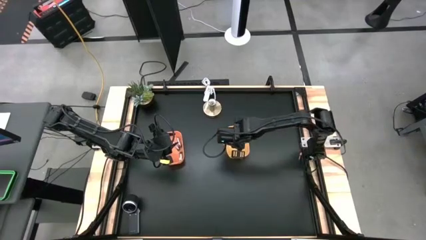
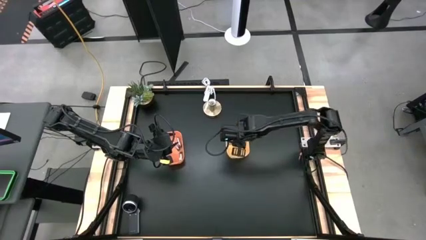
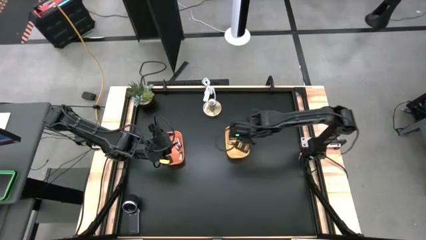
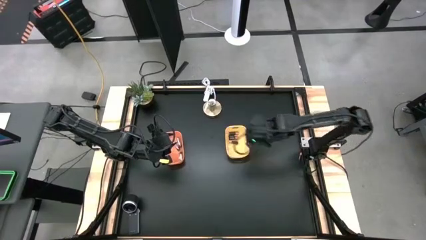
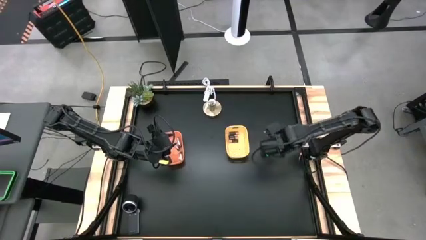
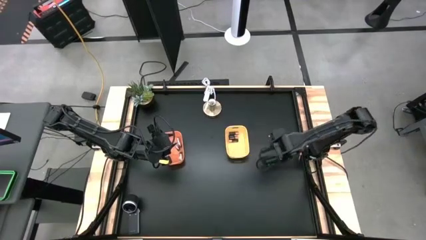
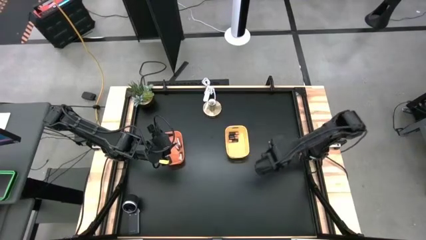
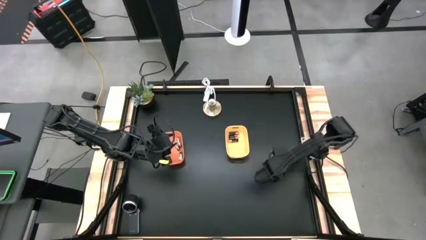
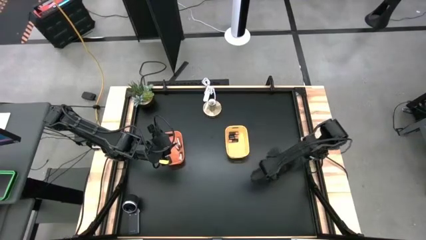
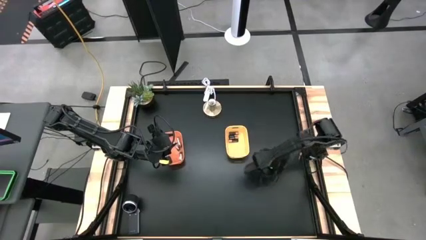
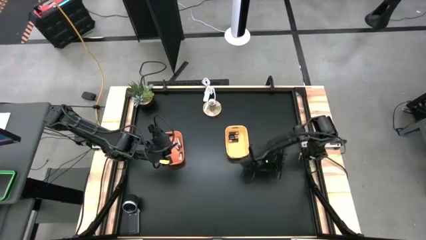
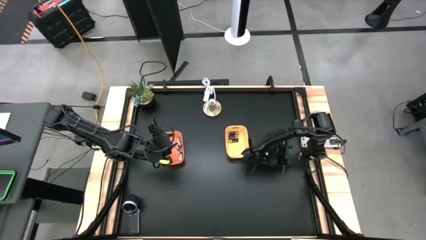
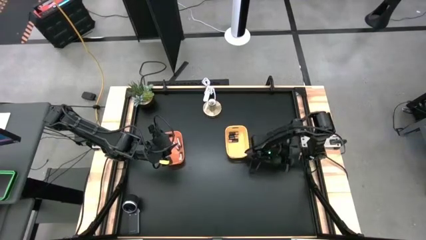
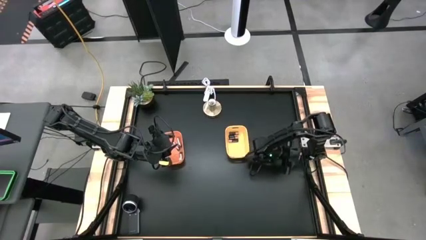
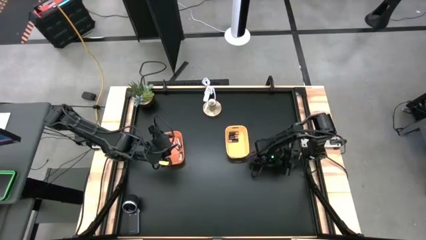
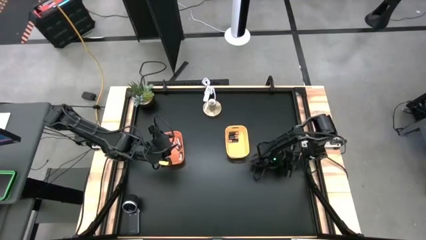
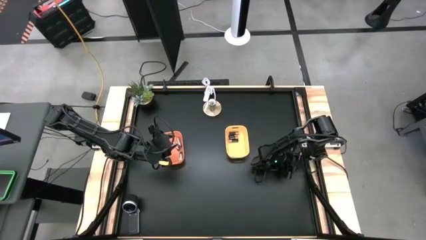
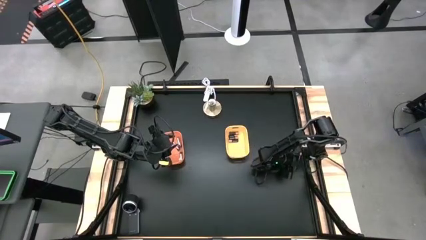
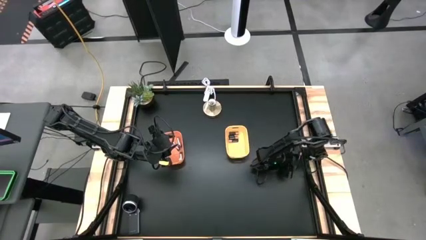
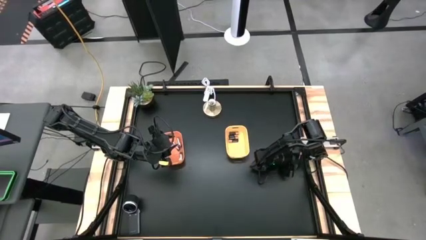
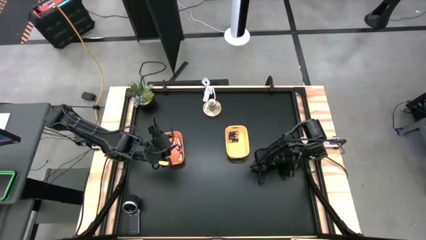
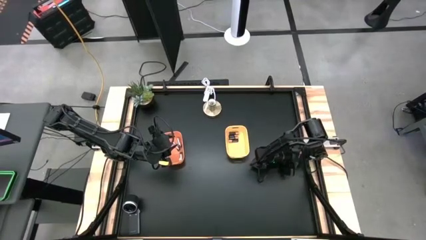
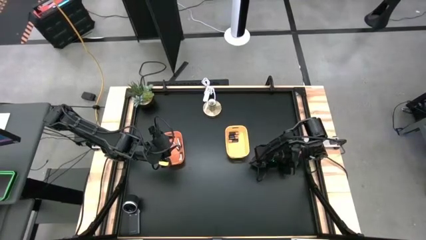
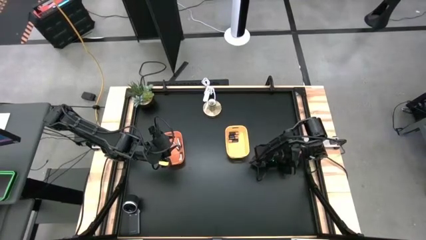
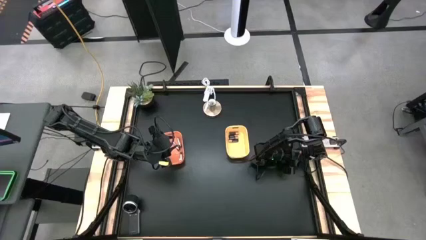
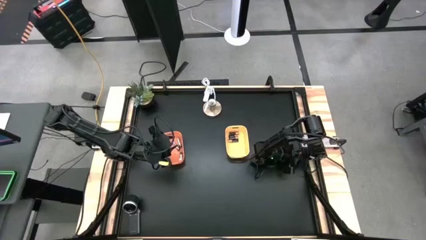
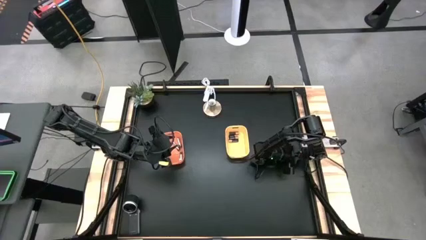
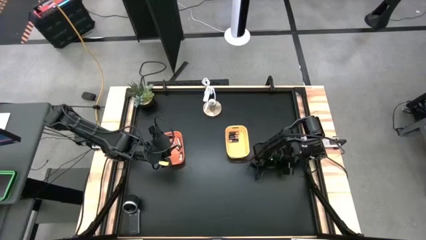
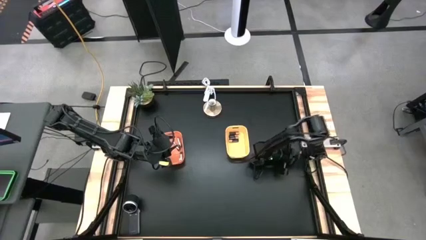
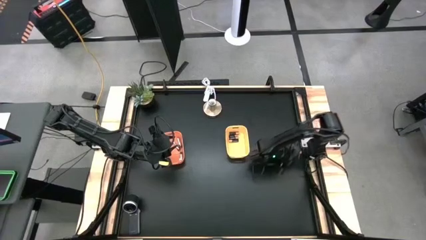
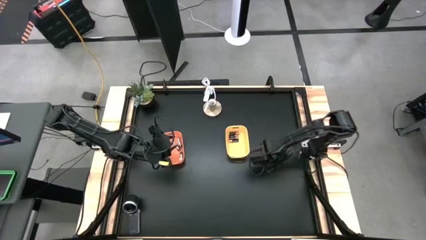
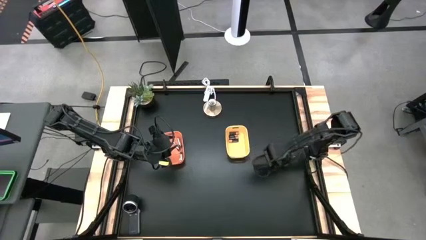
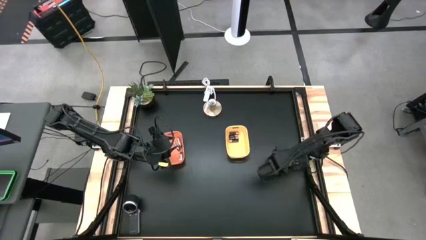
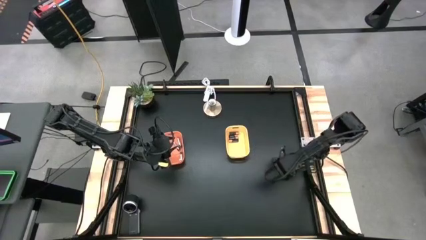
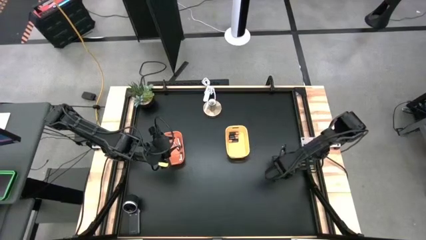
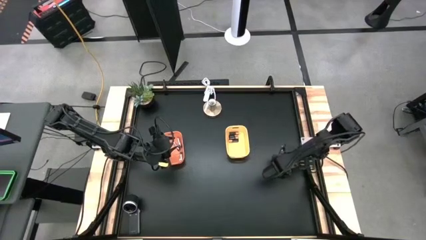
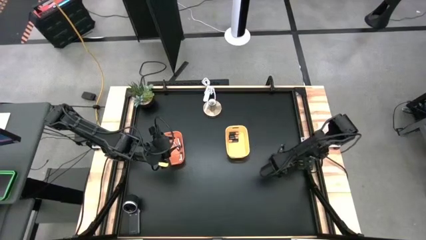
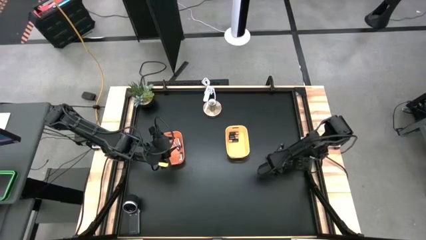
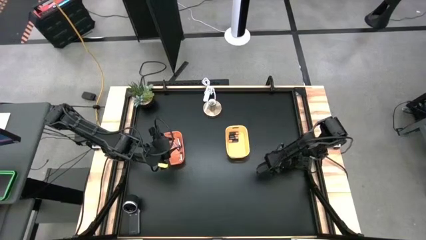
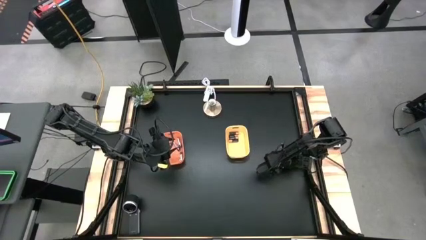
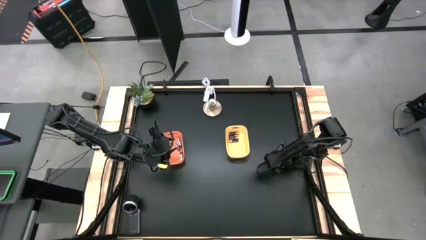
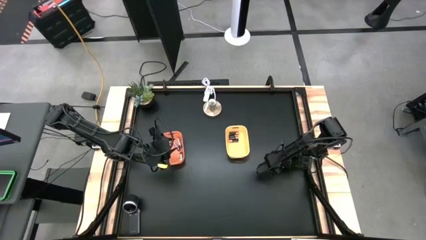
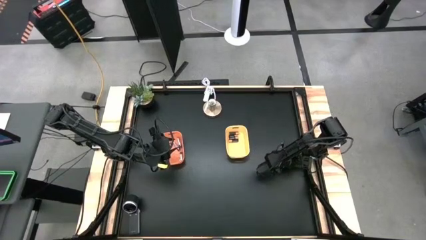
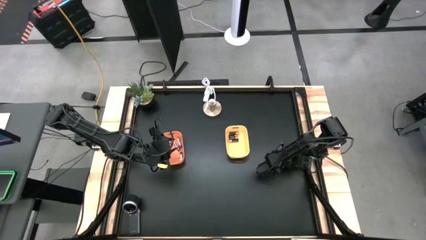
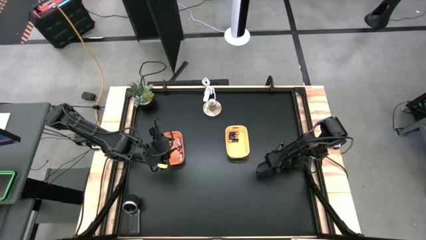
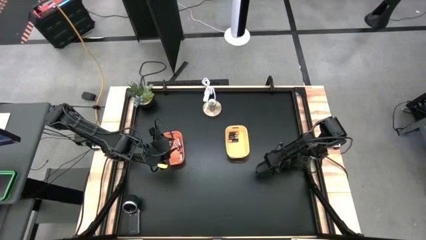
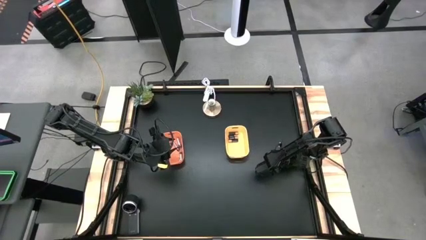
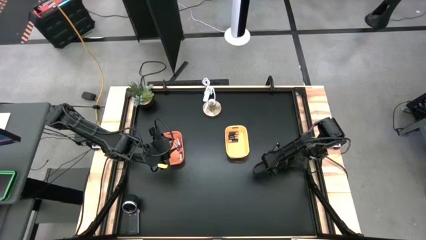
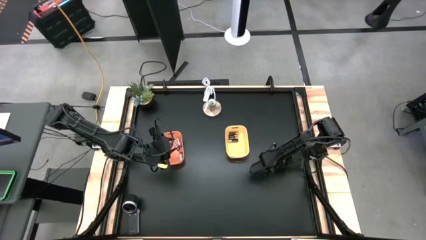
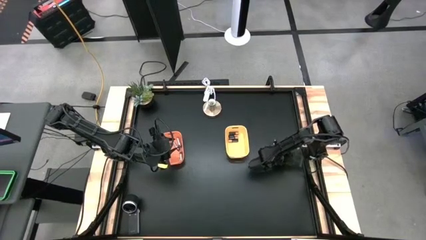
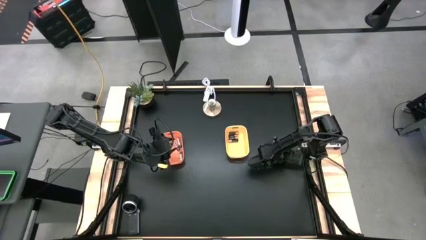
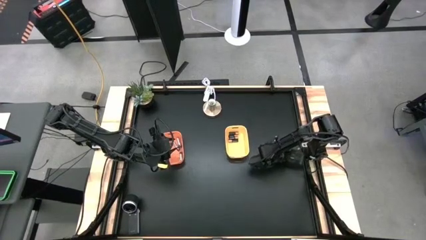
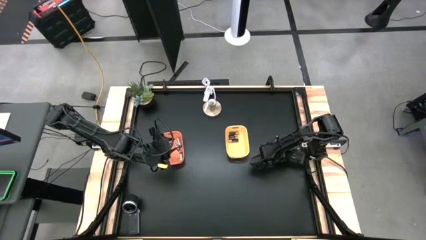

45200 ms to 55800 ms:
Task: Sort batteries
Put the black battery into the yellow bin

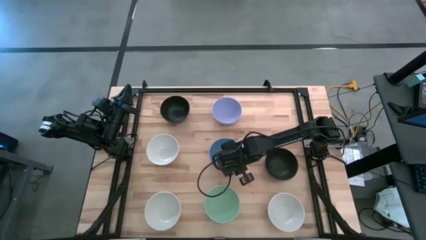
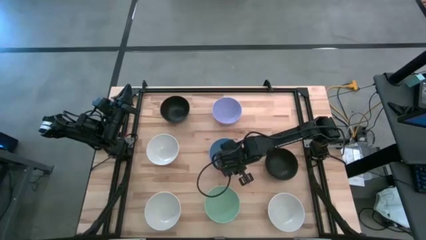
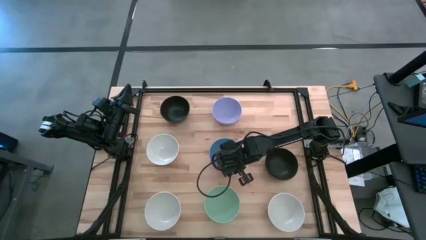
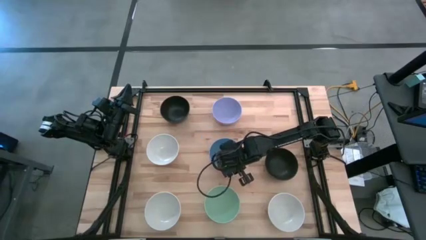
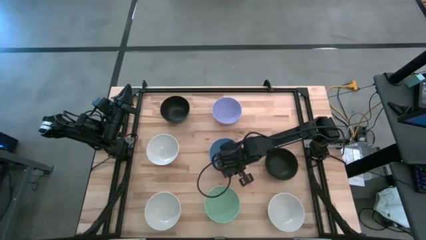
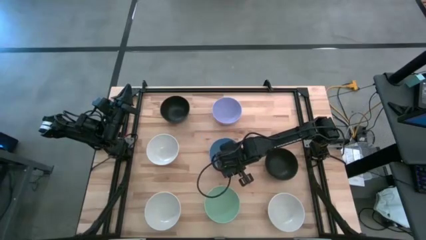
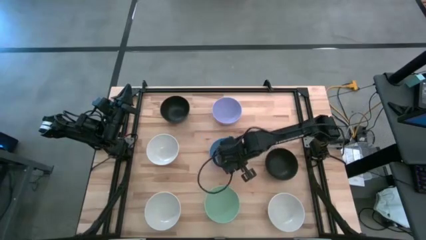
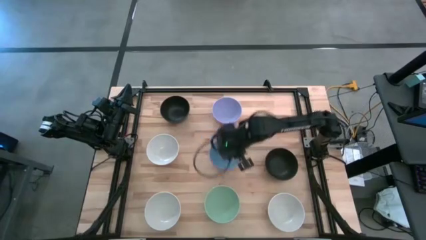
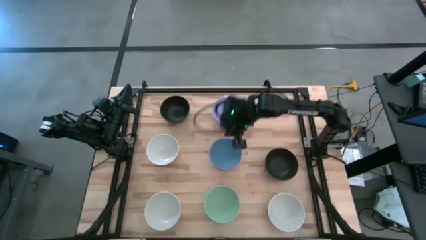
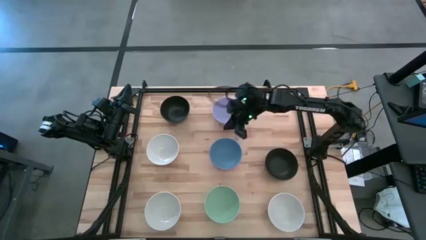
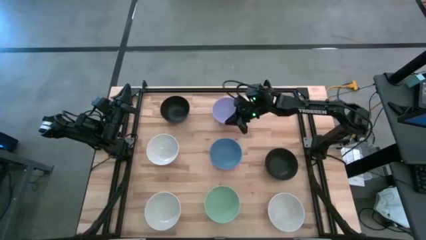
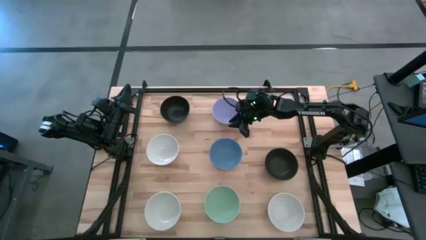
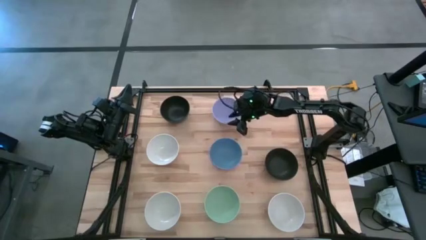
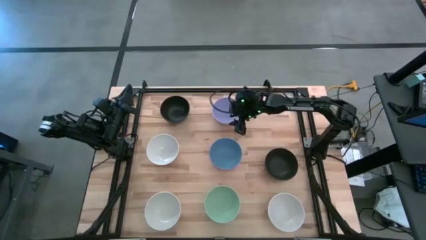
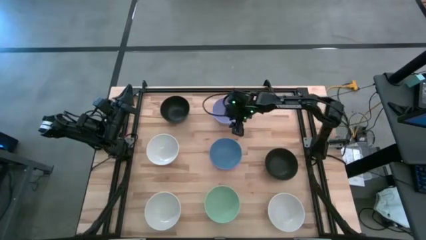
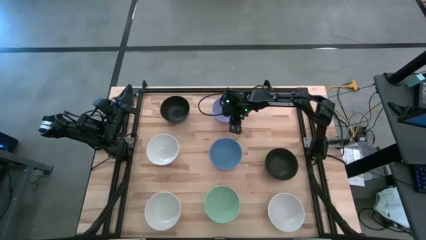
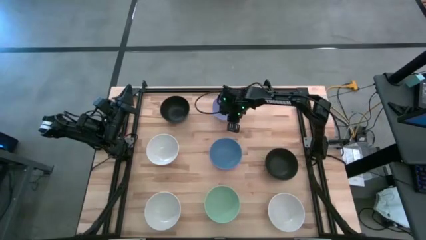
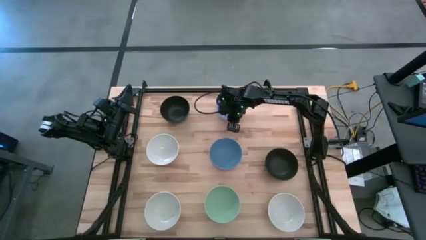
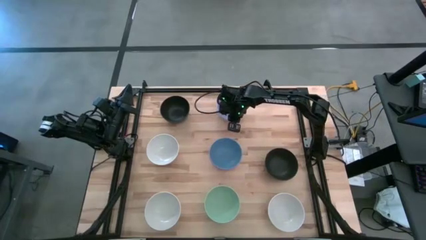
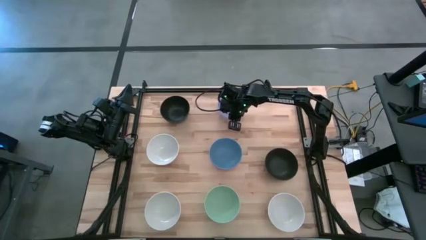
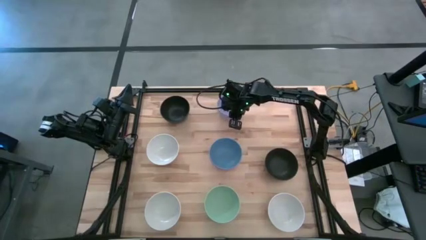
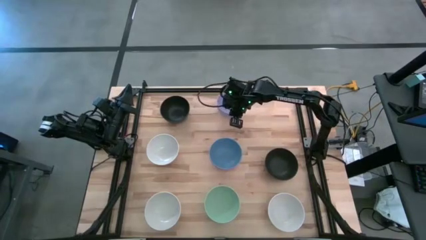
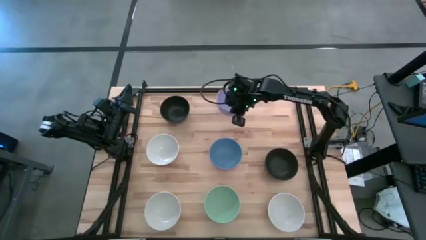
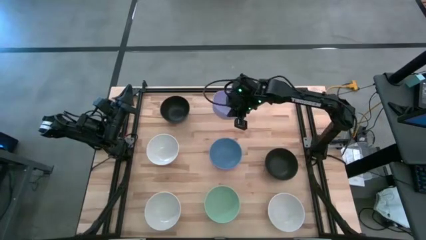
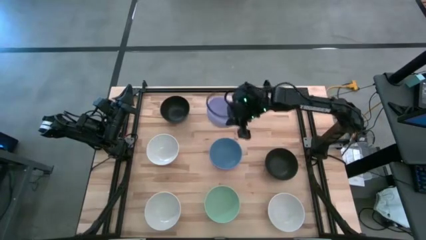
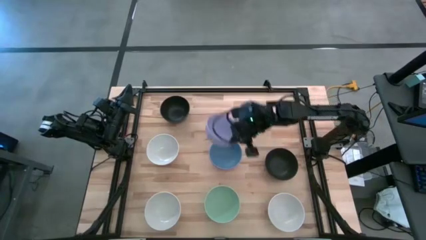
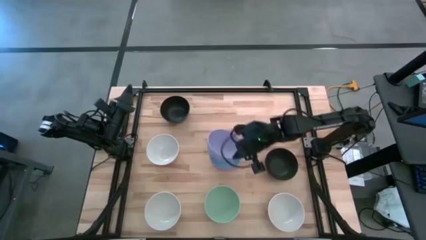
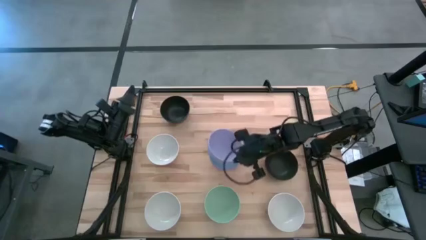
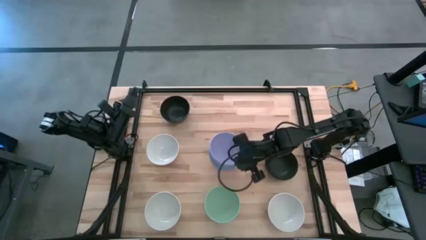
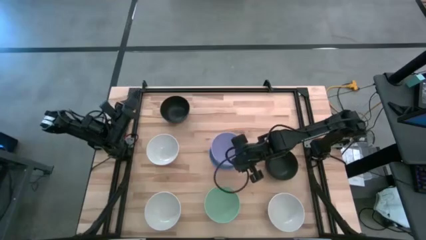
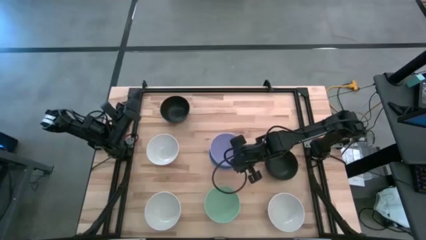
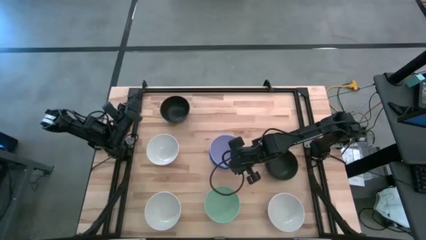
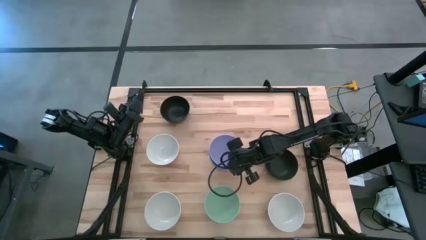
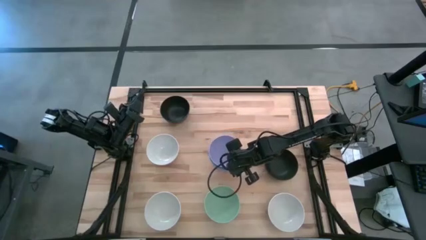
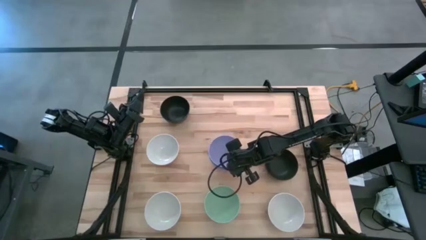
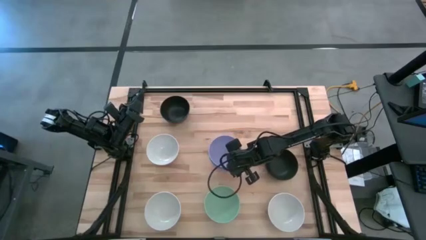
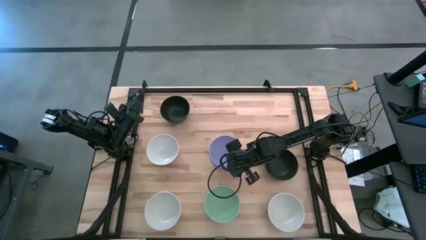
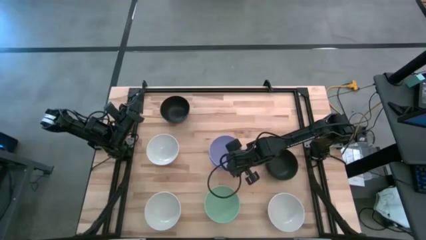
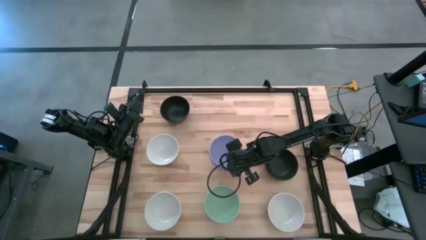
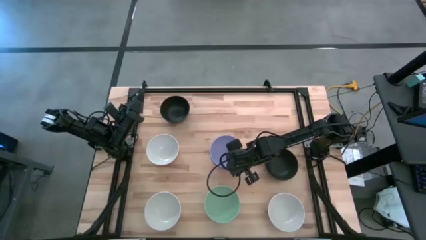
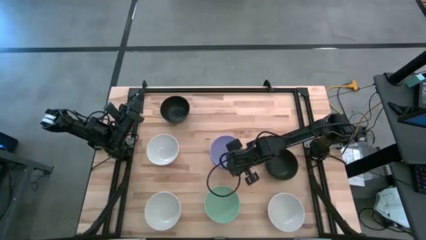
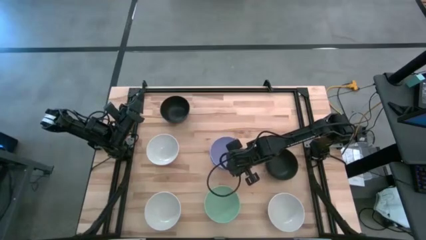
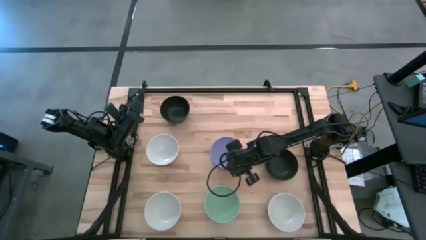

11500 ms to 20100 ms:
Task: Nest bowls inside each other
Stack the purple bowl into the blue bowl
